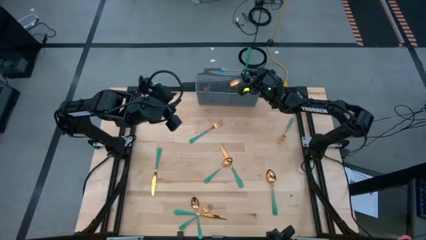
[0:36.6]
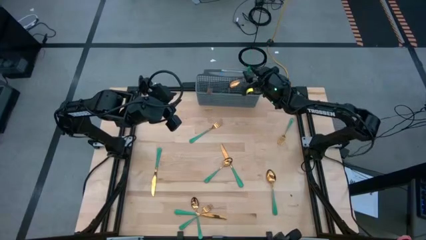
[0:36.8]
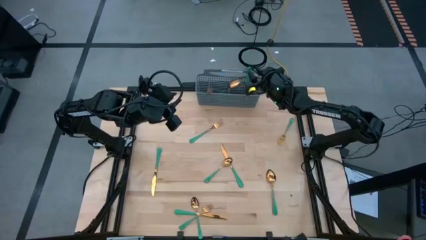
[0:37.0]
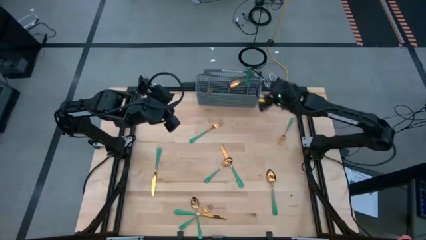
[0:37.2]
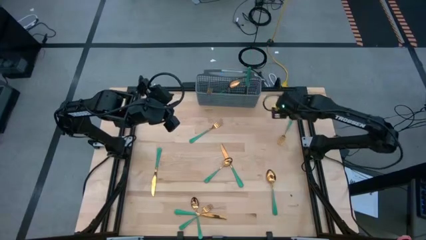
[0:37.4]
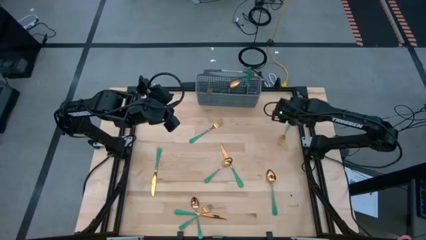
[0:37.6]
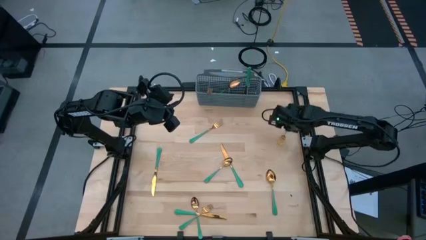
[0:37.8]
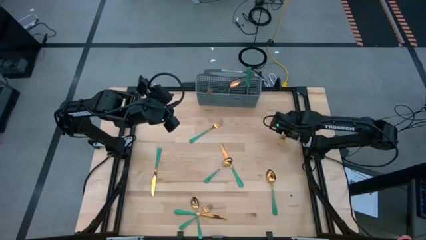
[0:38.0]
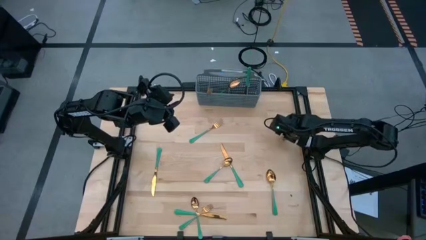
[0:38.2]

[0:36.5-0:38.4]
Task: Sort silverware
Put the green fork into the gray silverware basket with the other green fork

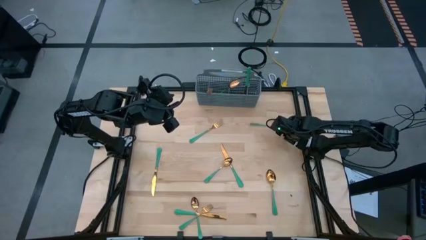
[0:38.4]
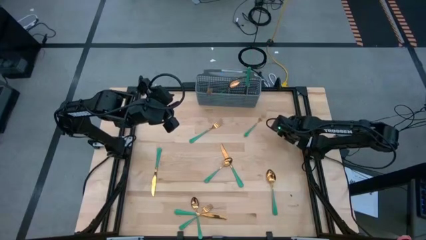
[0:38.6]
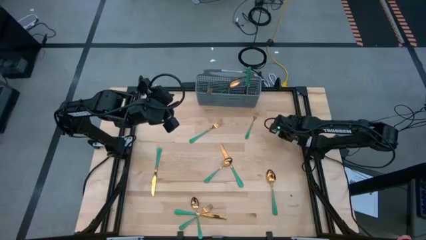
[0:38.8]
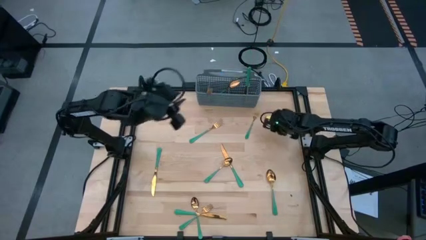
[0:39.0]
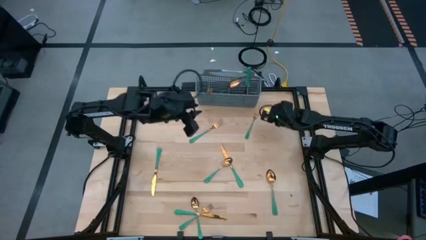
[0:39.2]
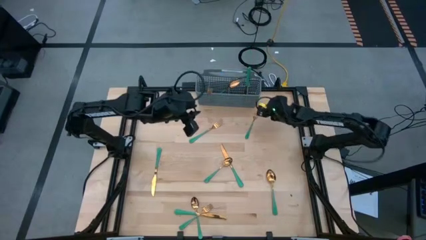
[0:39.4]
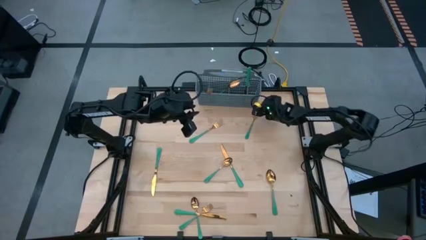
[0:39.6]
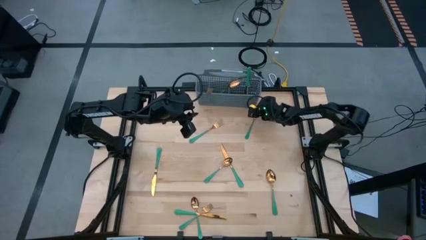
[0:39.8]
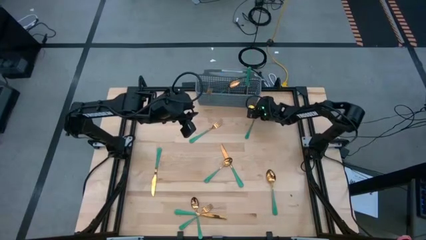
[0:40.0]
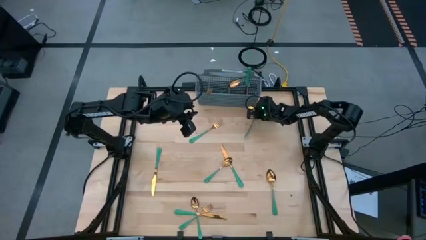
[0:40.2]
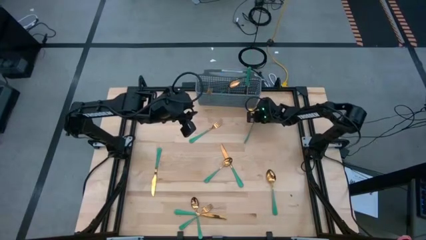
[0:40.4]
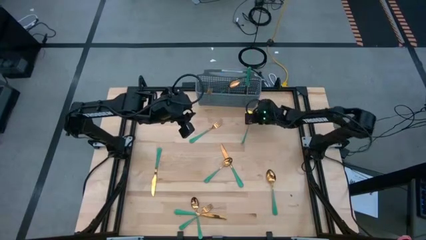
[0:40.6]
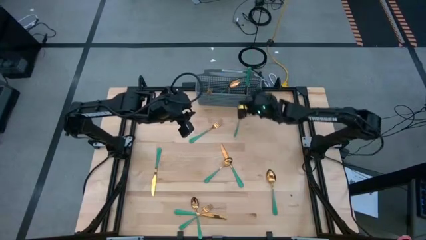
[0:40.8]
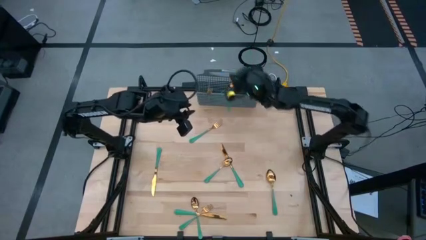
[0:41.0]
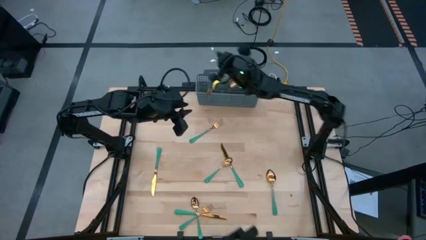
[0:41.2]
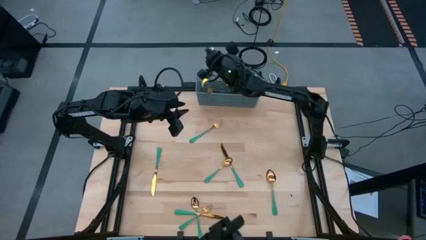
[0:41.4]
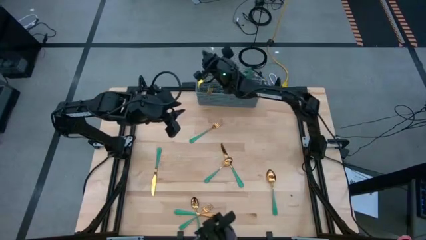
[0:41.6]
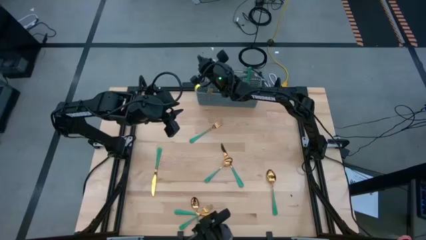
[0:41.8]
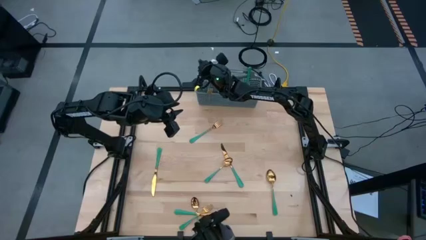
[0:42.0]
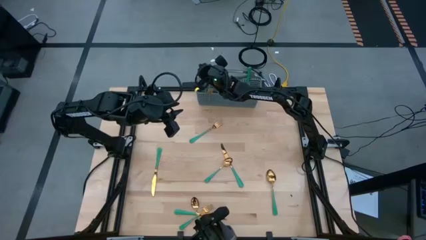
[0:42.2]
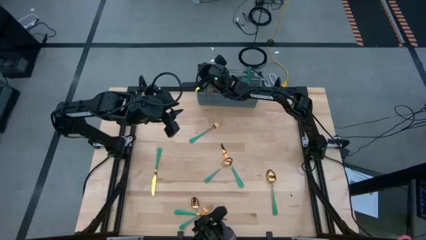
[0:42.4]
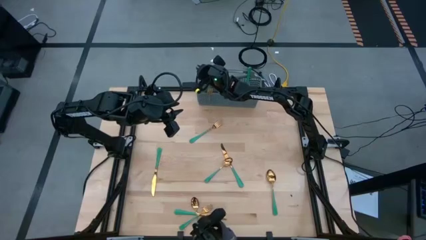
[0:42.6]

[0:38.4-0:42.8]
Put the green fork into the gray silverware basket with the other green fork

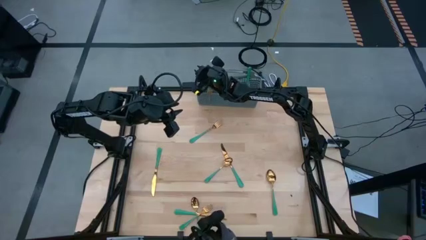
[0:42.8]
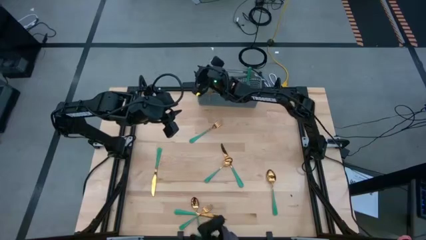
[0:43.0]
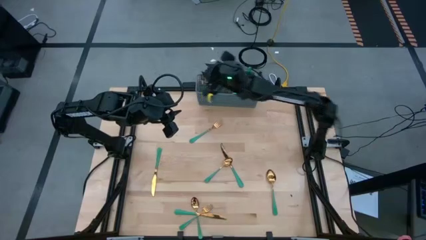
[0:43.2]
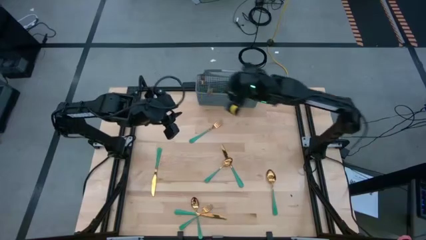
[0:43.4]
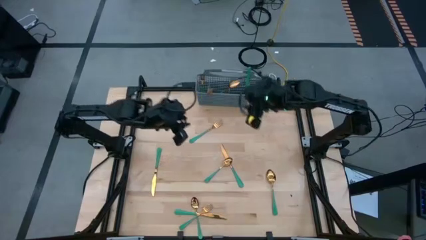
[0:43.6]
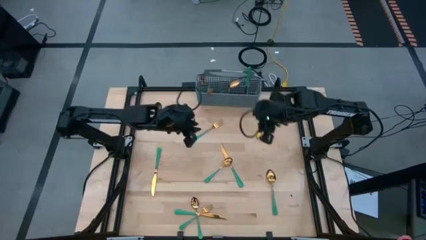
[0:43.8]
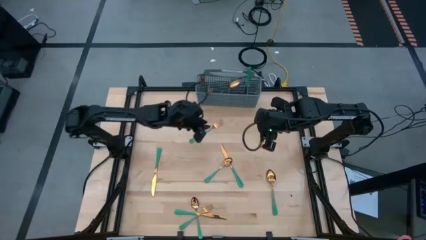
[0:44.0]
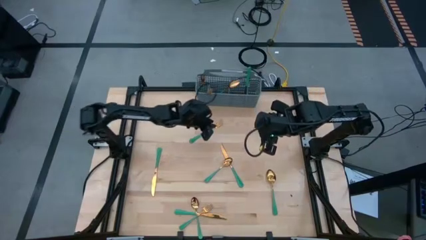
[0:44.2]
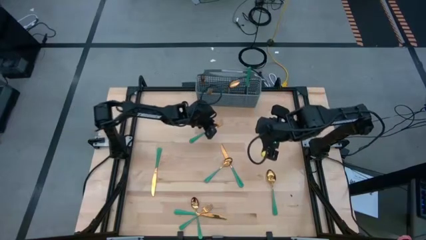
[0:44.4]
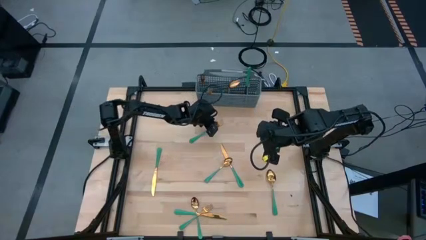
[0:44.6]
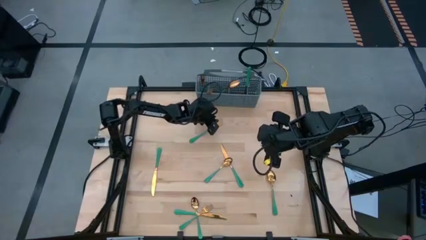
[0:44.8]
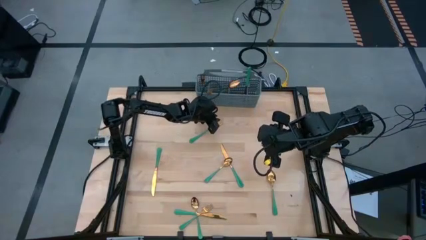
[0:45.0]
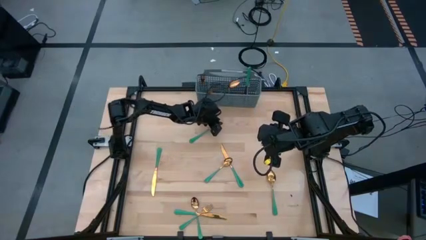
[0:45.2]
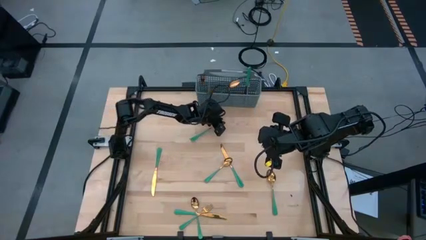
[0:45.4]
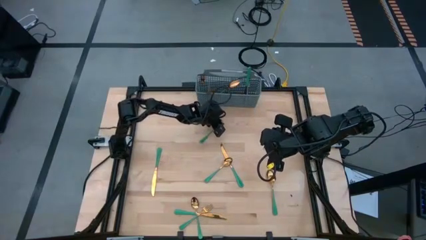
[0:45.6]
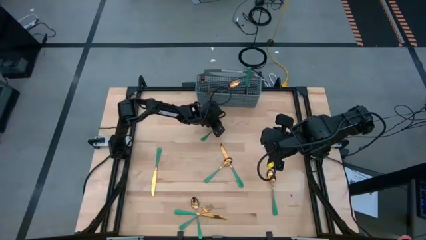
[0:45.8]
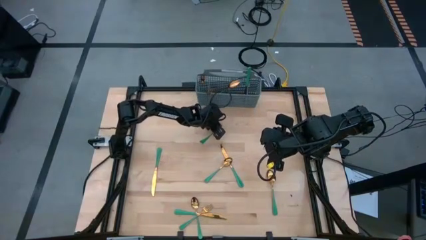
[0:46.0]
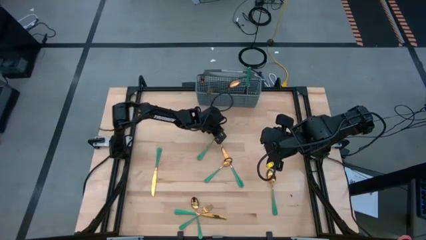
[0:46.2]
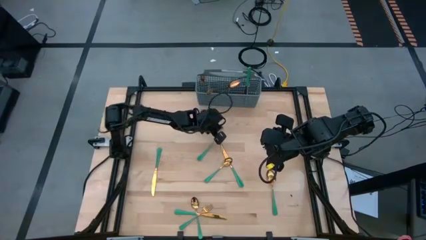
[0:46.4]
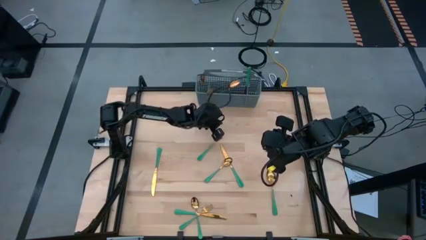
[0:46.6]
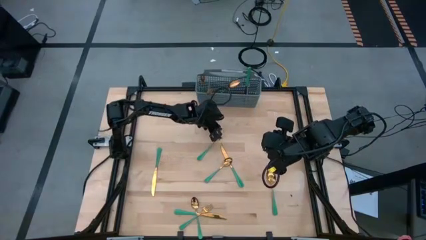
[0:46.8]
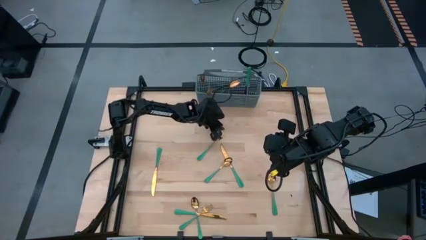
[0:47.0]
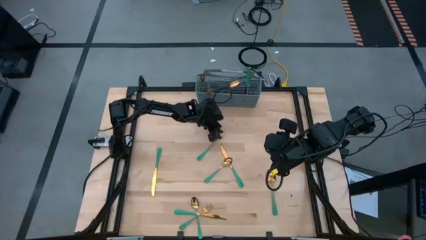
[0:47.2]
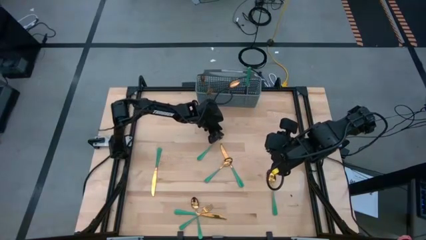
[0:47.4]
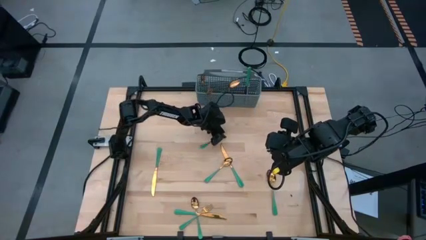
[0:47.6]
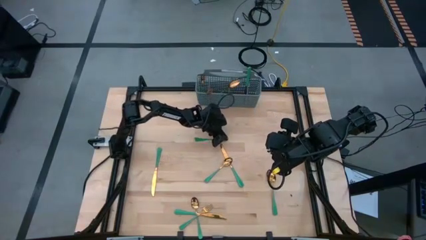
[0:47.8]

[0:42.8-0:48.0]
Put the green fork into the gray silverware basket with the other green forks

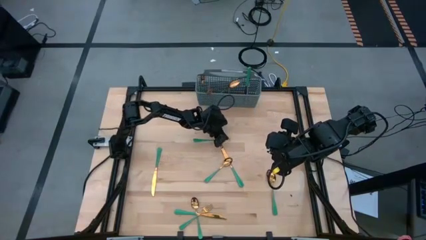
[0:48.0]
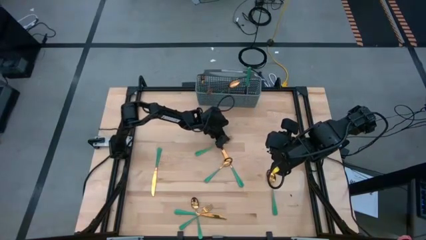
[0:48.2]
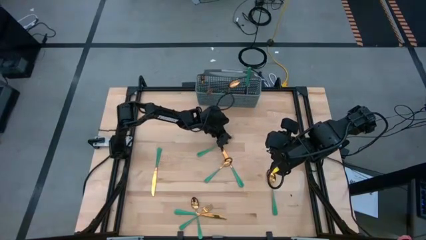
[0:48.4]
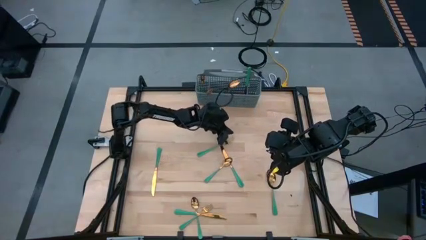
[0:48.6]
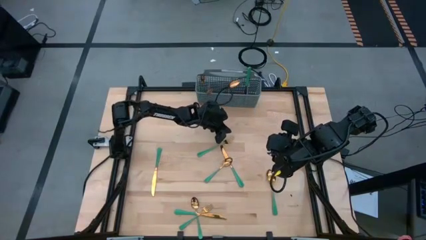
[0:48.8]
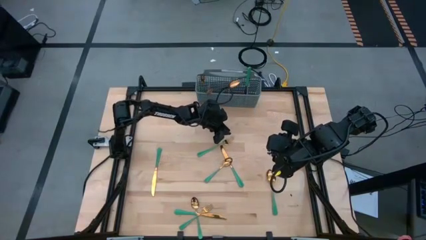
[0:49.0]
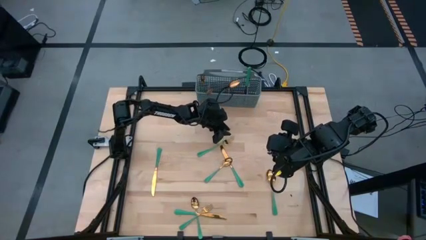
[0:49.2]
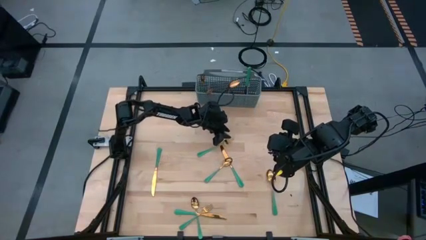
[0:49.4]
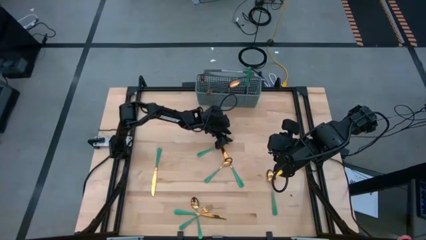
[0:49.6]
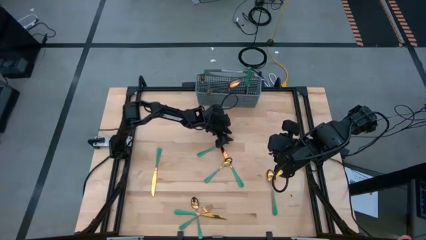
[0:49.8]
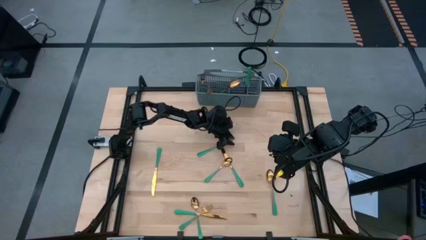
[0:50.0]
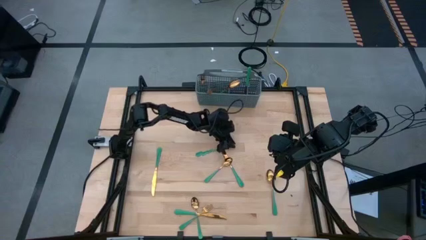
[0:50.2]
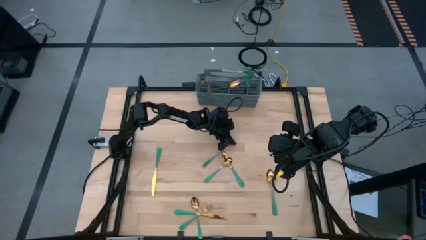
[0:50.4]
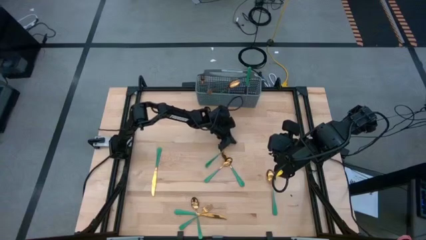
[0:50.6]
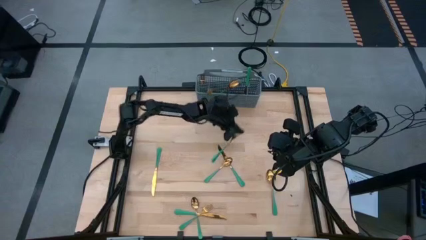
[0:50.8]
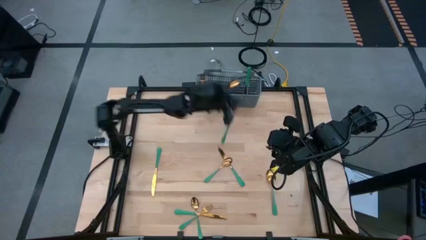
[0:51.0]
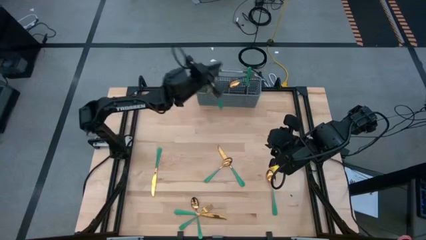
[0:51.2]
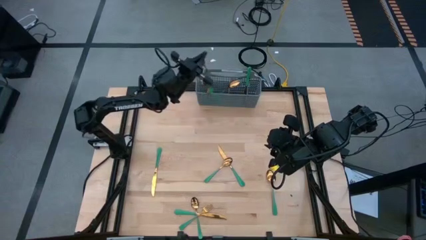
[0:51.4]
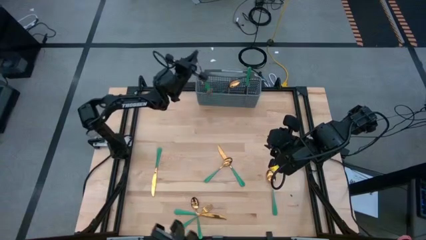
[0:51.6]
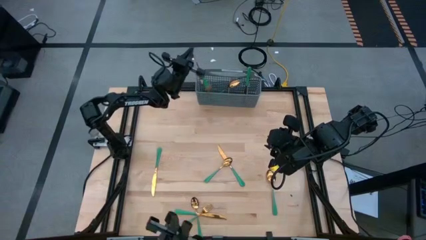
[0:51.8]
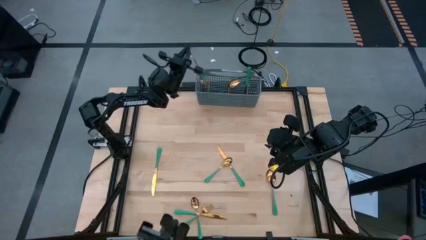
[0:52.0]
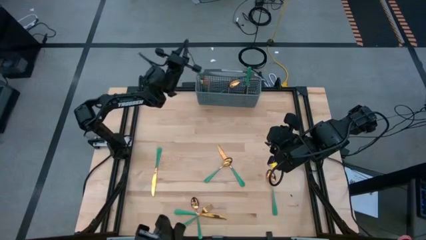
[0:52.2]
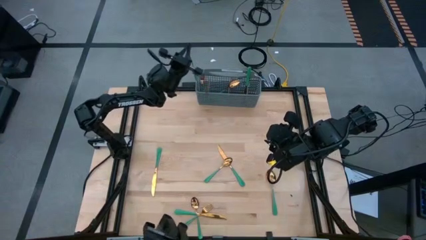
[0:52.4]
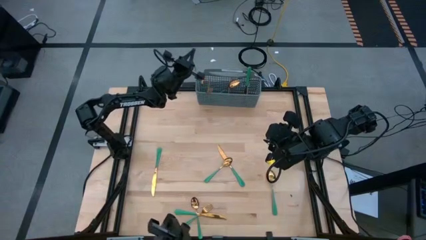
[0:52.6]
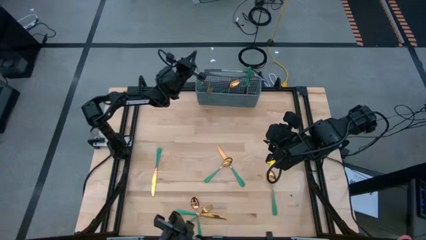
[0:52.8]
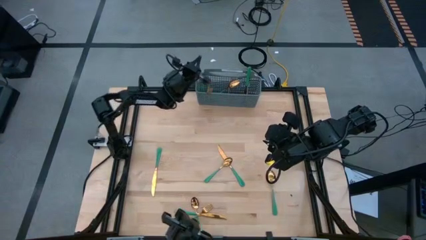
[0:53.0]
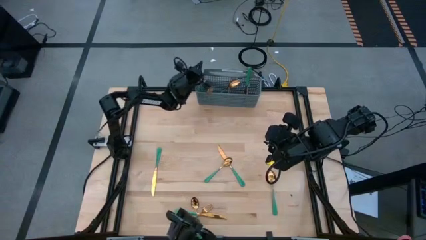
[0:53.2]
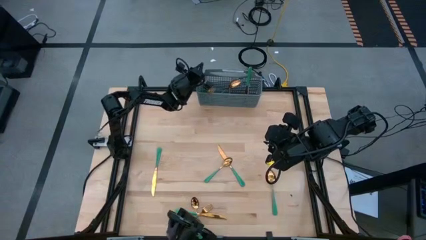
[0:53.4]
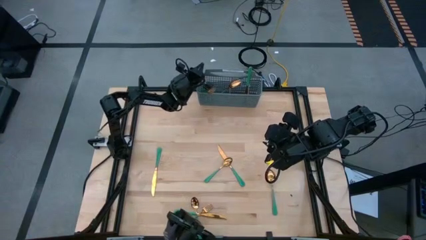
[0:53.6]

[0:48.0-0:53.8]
Put the green fork into the gray silverware basket with the other green forks
